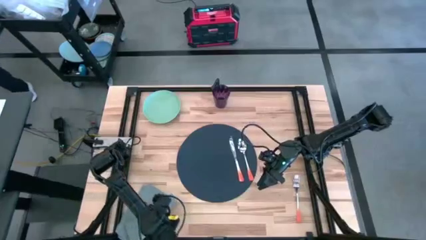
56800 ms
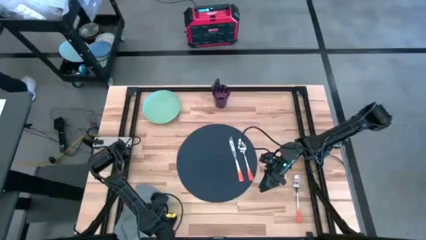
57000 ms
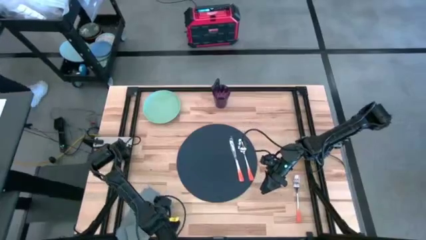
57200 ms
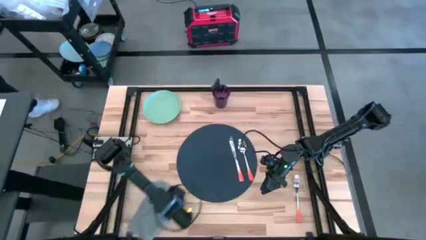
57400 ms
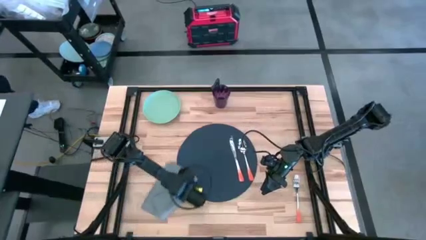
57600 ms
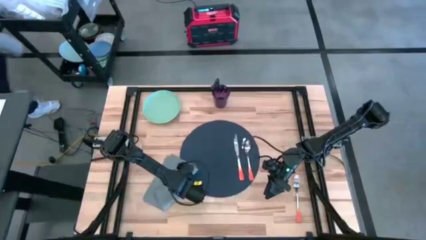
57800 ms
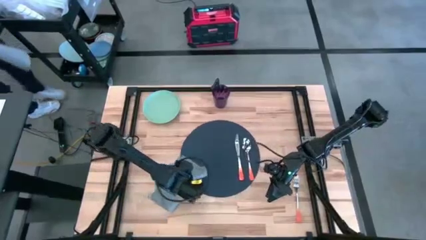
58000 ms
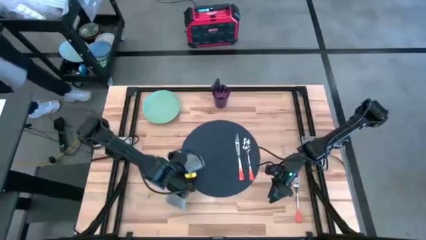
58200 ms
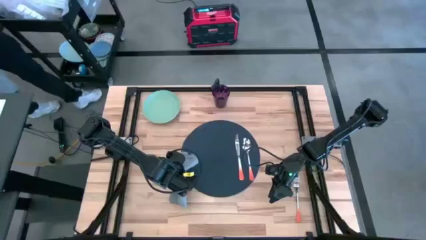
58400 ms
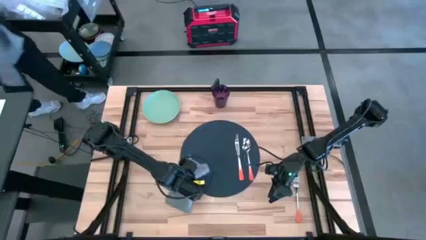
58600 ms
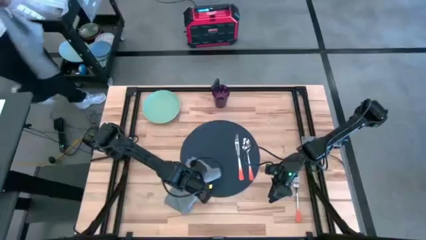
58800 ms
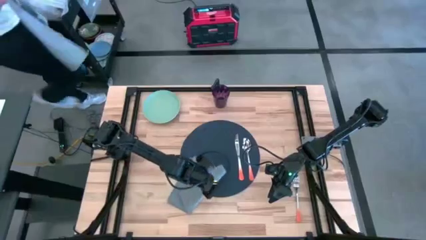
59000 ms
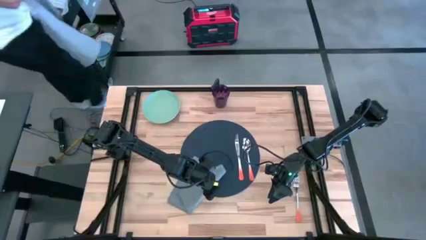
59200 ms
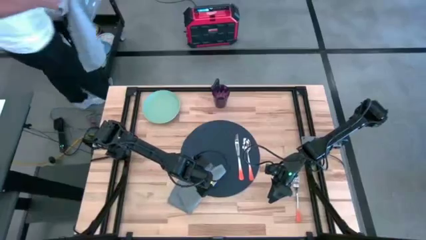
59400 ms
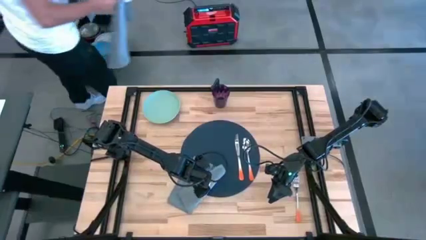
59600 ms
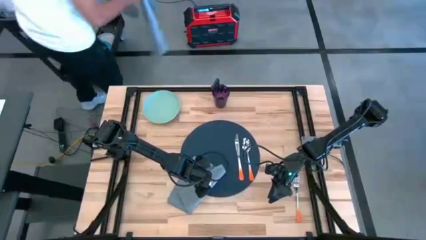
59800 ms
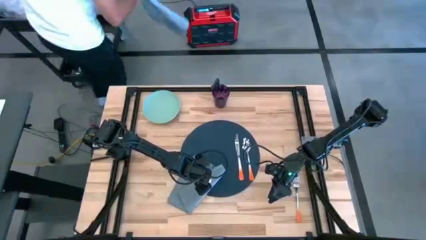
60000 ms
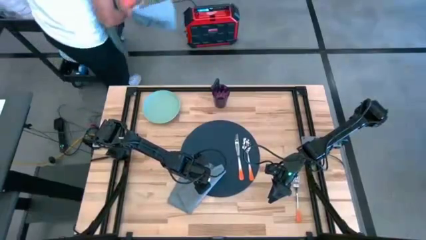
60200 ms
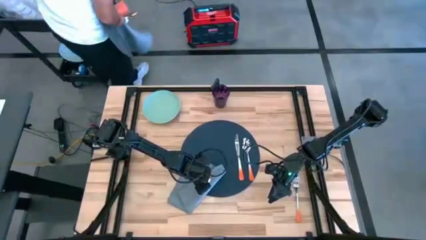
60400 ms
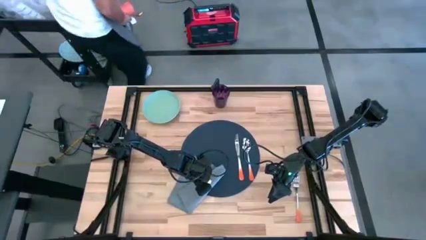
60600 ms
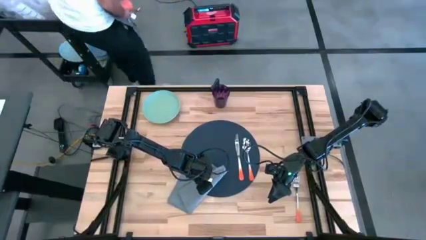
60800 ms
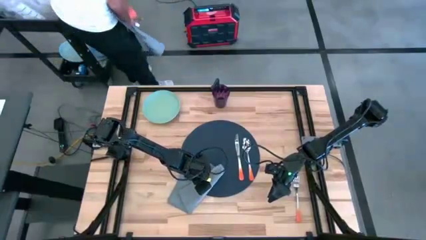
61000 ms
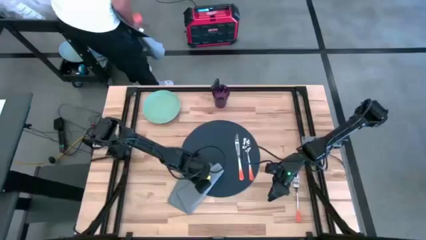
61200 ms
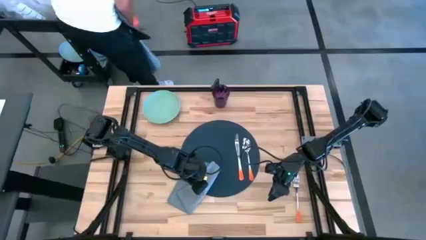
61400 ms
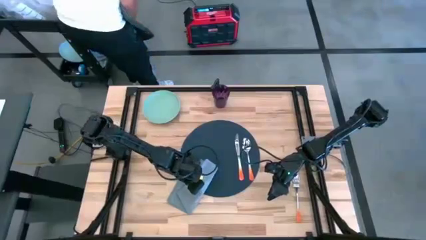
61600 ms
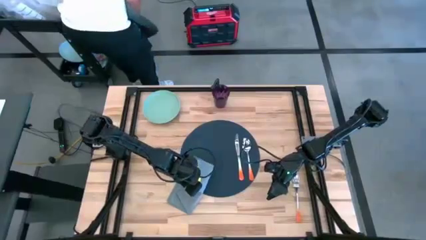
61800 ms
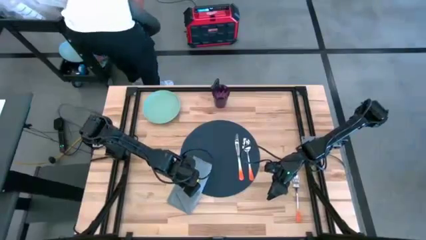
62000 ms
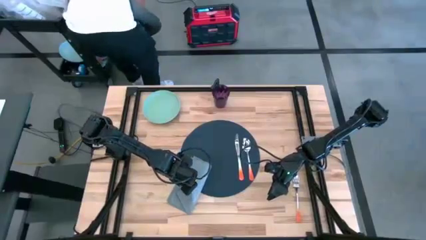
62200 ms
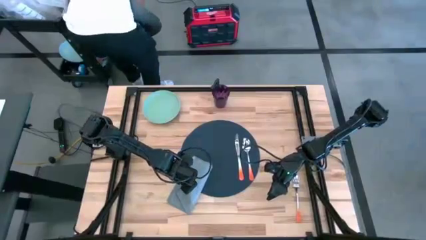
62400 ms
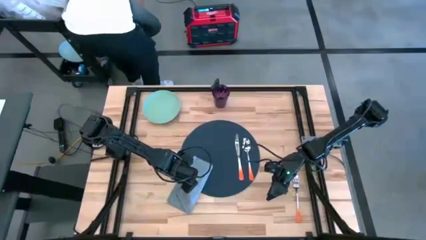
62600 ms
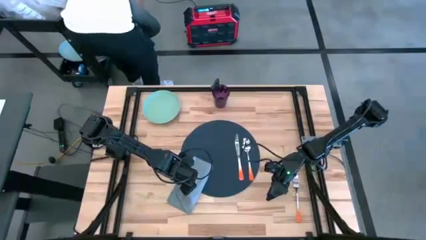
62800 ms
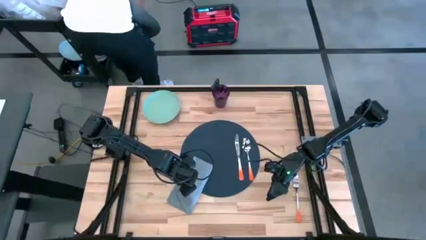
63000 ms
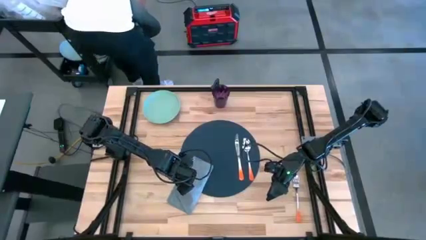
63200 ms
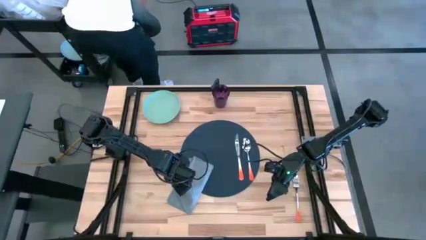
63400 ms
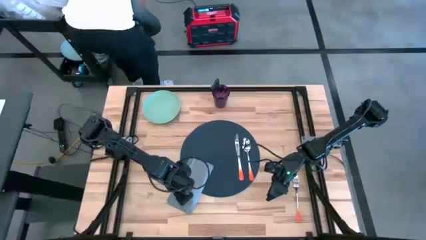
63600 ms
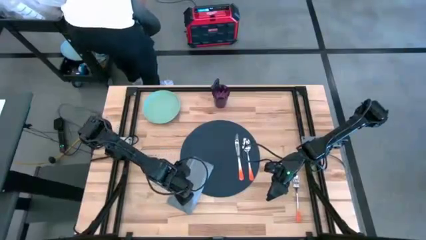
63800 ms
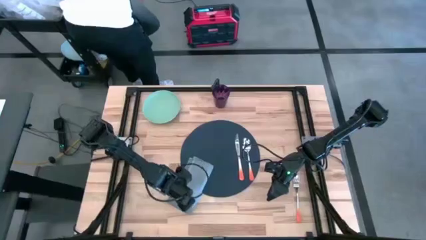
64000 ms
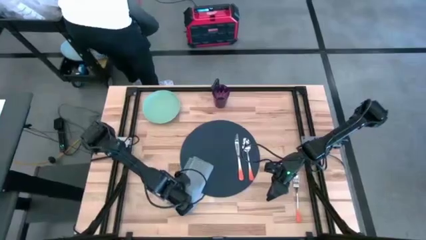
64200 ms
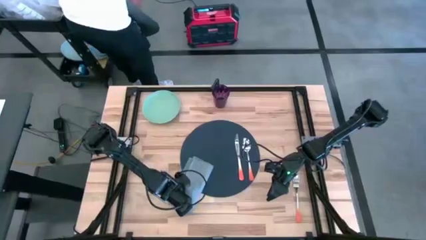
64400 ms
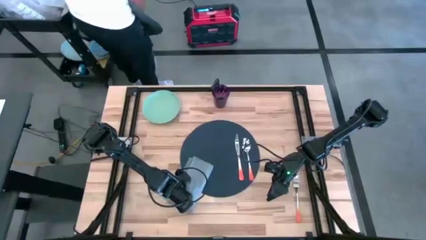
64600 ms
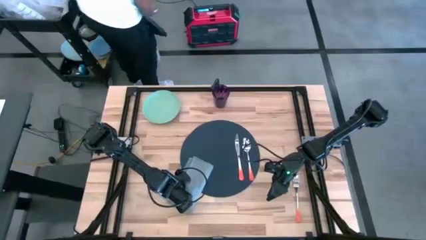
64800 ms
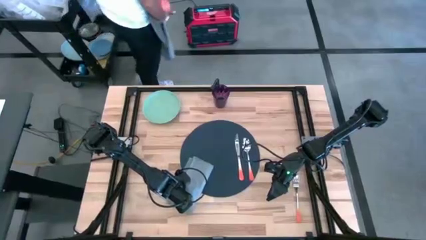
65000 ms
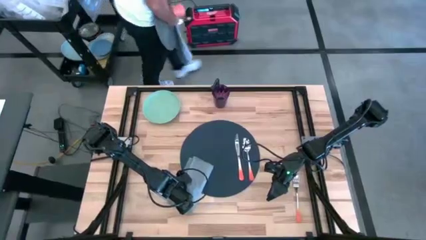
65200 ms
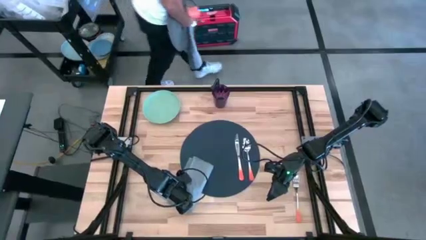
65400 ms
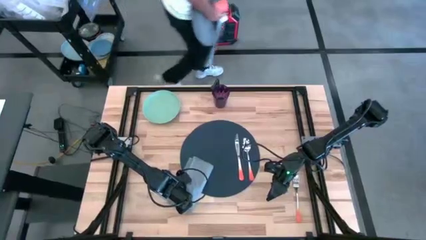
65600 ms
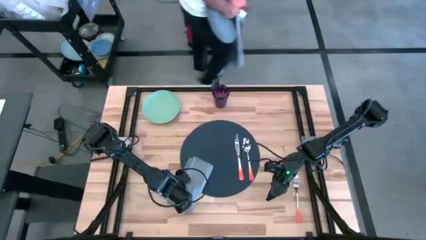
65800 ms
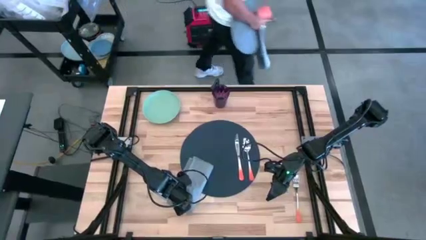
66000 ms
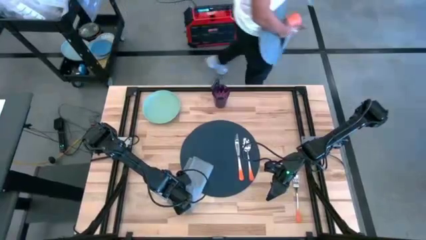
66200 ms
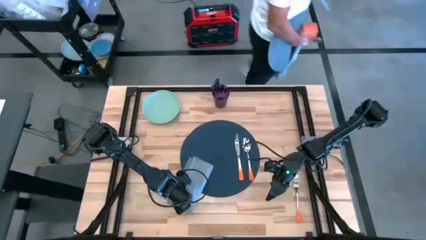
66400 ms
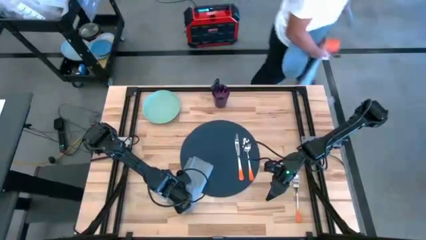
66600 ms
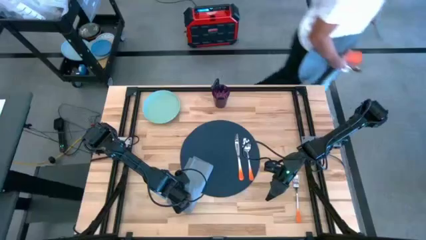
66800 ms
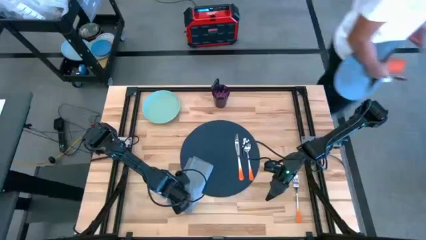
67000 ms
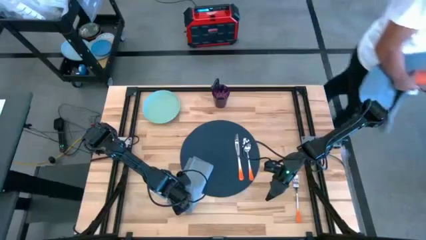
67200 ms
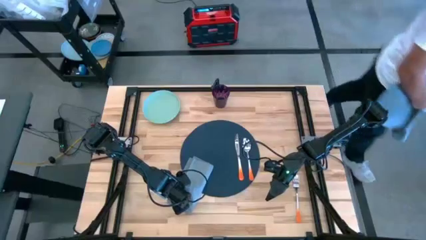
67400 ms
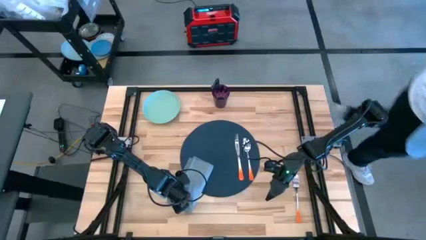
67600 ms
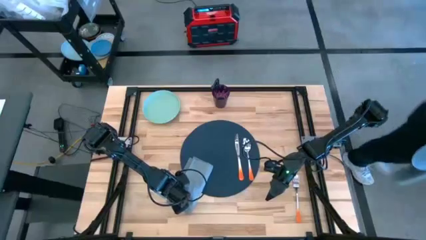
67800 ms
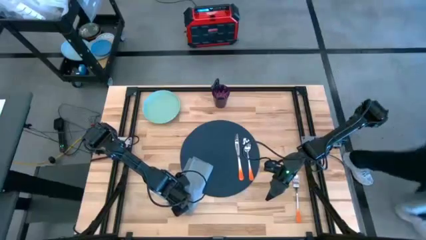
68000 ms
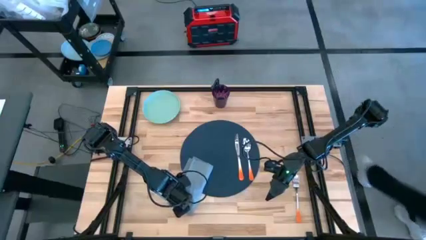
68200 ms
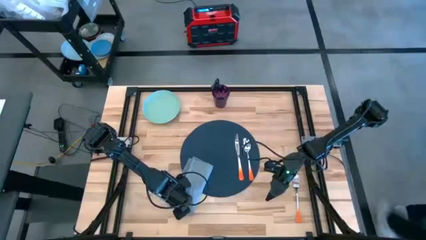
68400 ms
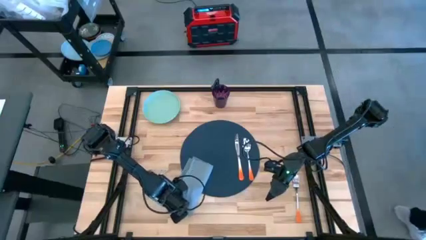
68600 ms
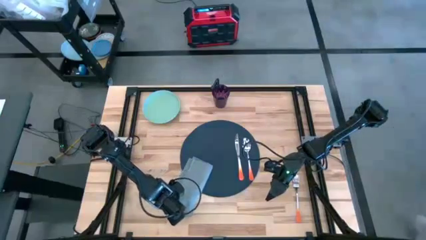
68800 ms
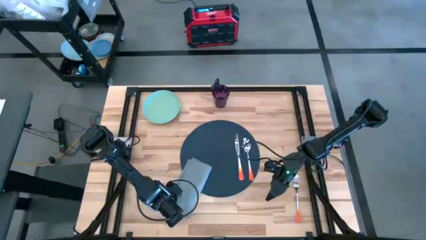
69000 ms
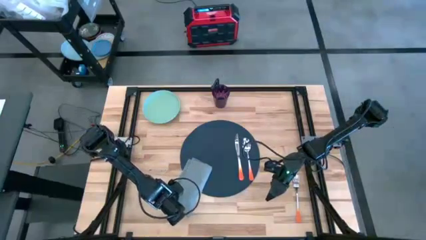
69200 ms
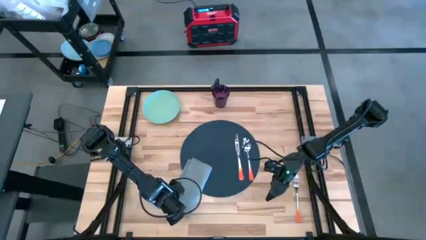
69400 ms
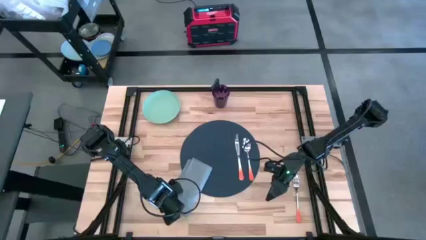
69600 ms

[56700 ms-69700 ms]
Task: Set table place
Fold the table napkin

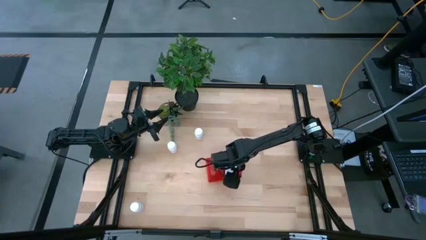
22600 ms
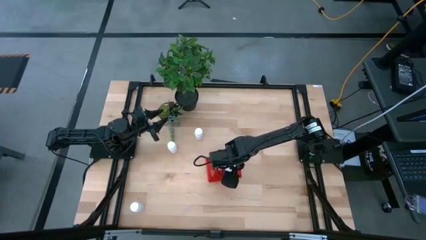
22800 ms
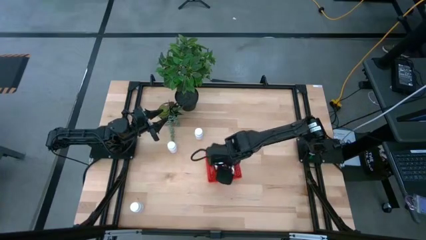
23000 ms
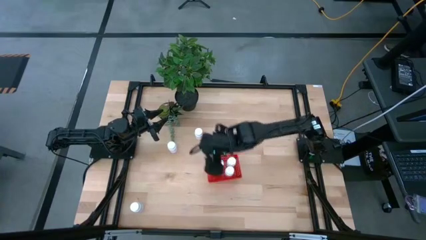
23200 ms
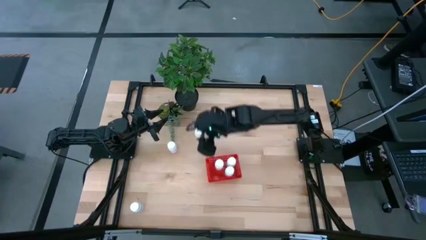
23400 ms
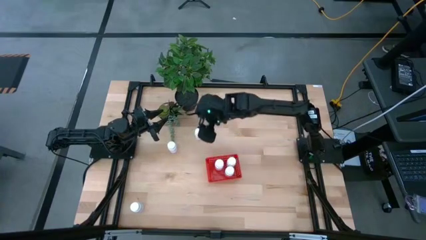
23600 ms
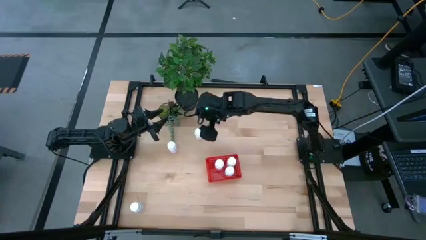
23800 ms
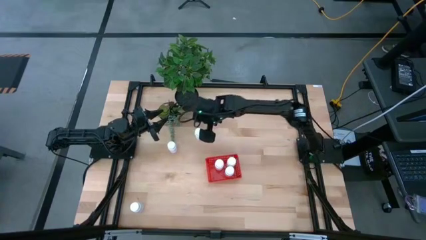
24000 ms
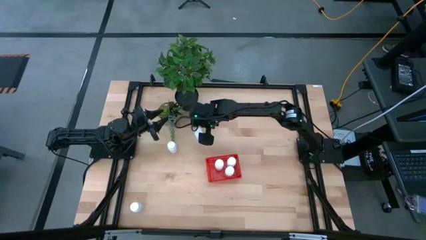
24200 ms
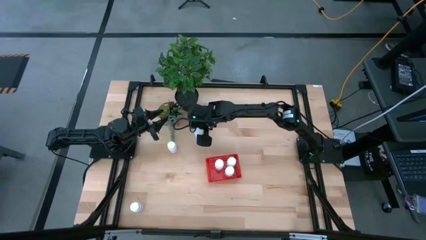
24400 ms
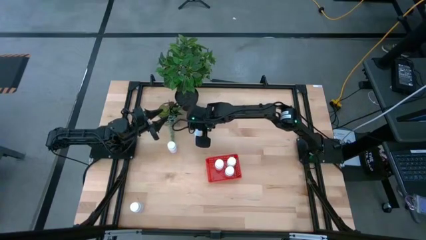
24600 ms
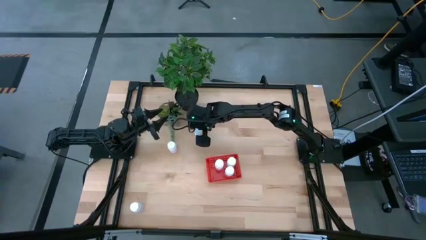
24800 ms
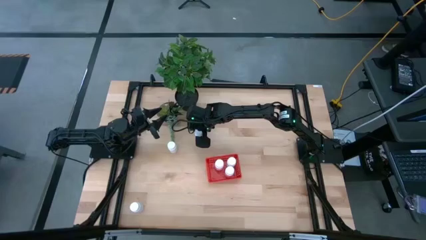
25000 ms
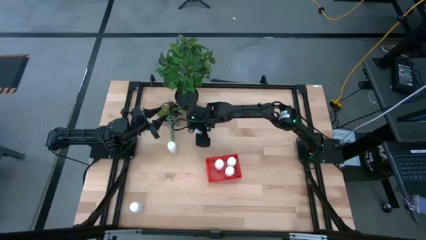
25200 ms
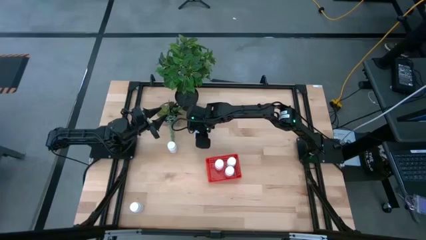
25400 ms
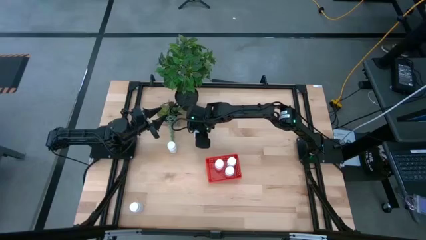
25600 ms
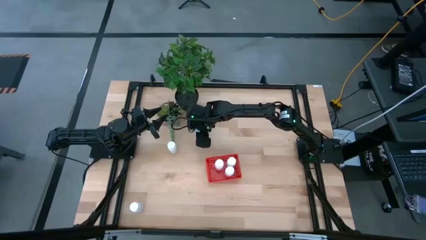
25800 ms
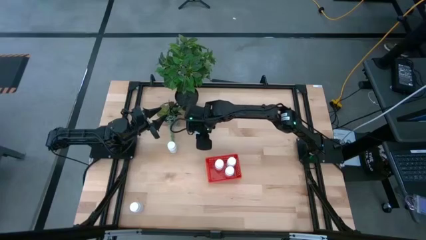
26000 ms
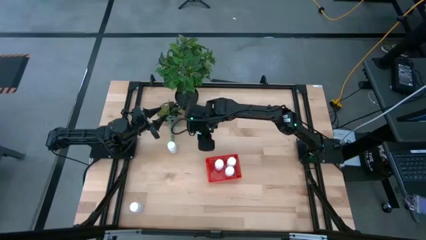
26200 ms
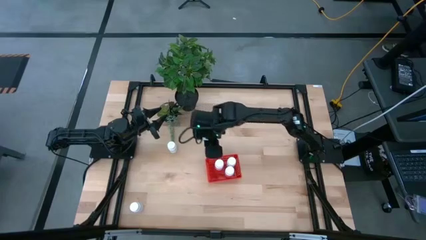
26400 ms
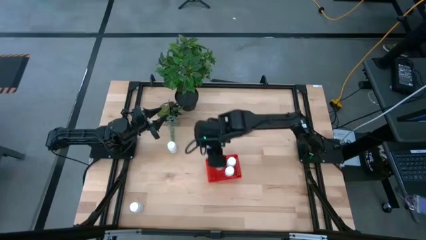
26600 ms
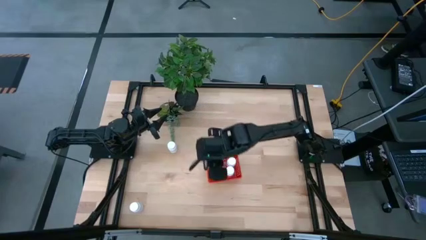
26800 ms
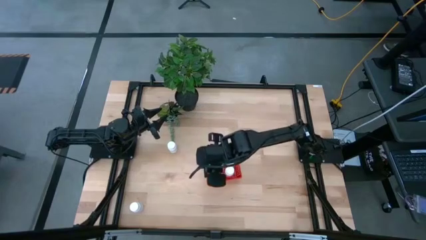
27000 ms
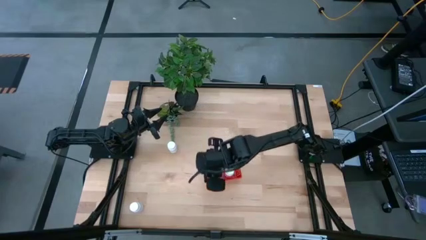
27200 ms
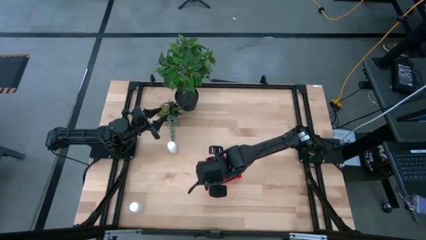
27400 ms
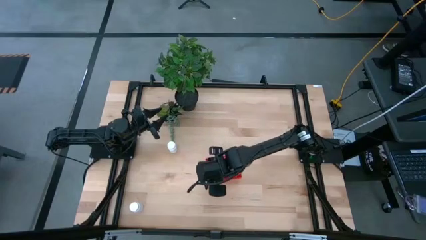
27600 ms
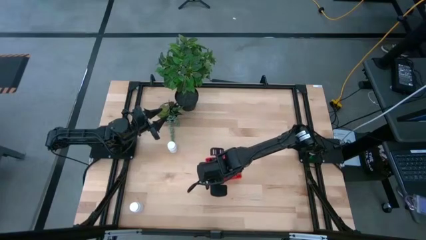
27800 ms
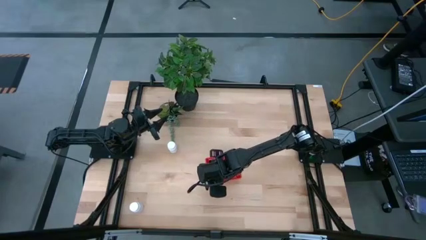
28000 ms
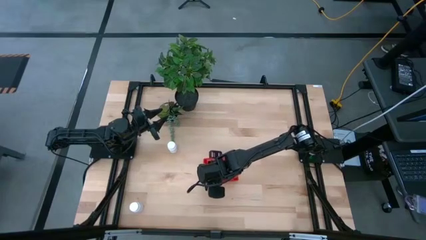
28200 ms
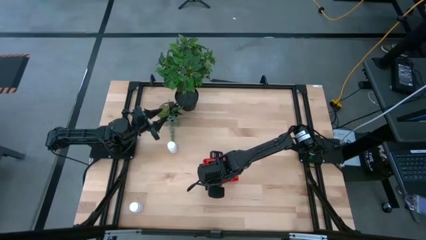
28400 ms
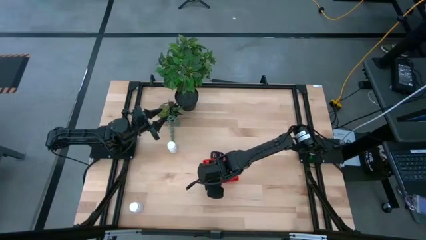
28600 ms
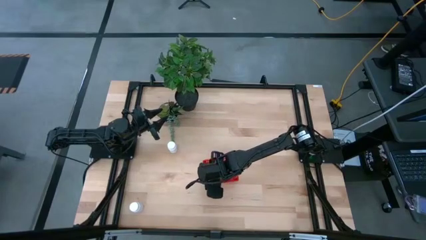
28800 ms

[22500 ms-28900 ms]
Task: Pick and place pill bottles into a basket
Put the white pill bottles into the red bin
